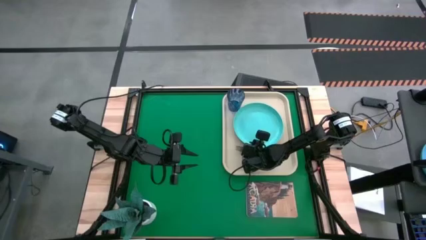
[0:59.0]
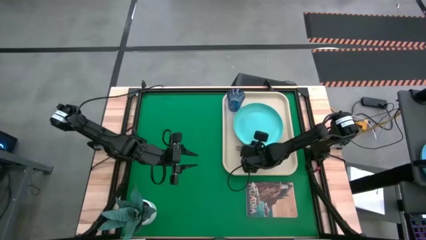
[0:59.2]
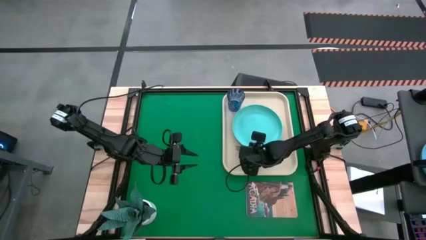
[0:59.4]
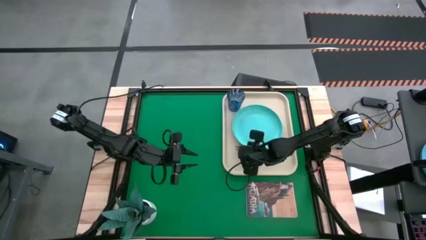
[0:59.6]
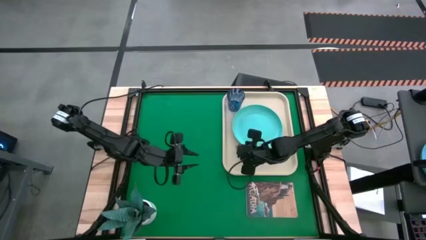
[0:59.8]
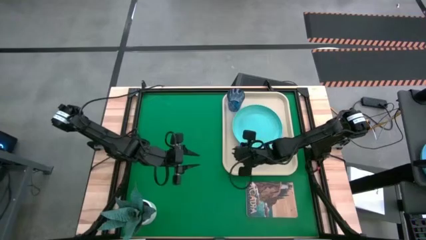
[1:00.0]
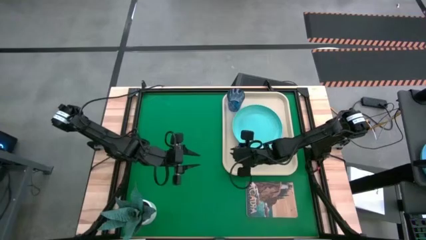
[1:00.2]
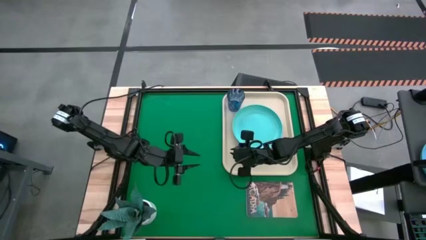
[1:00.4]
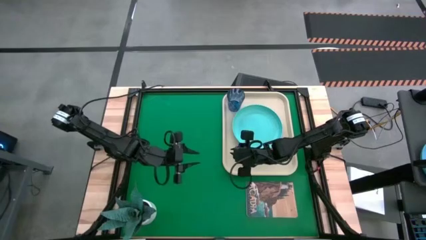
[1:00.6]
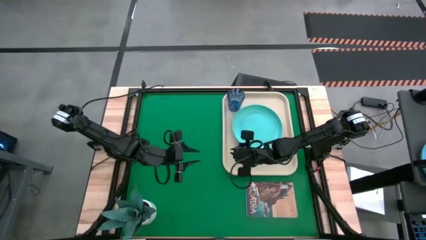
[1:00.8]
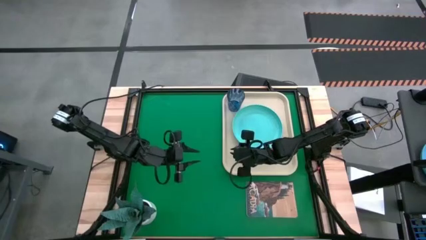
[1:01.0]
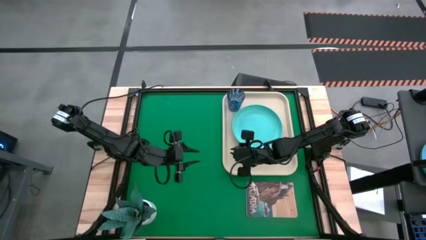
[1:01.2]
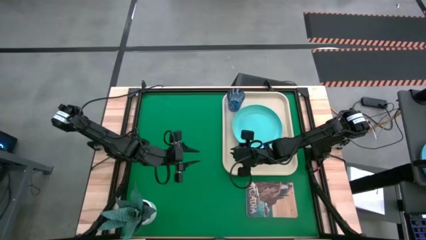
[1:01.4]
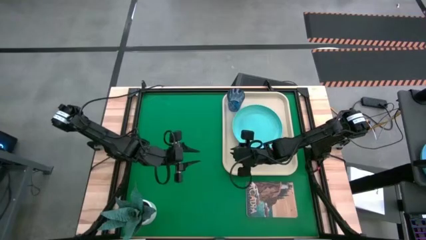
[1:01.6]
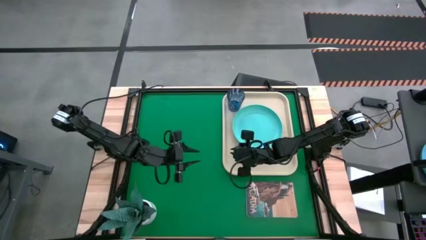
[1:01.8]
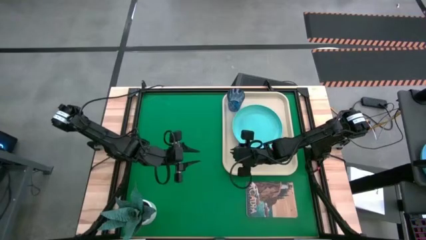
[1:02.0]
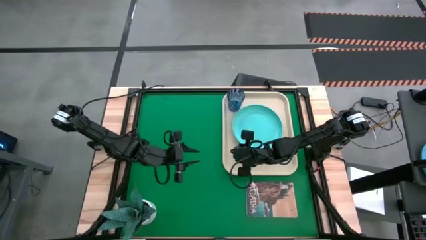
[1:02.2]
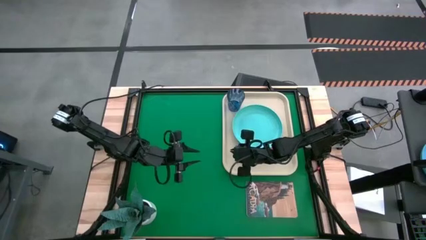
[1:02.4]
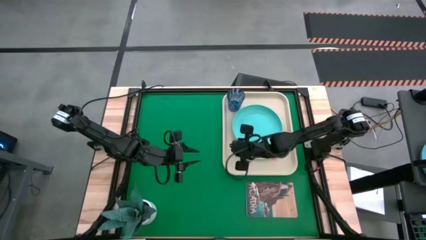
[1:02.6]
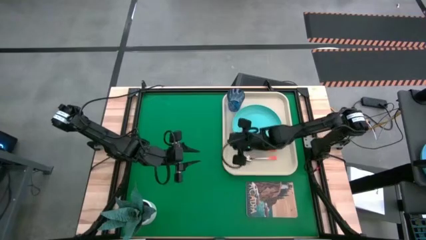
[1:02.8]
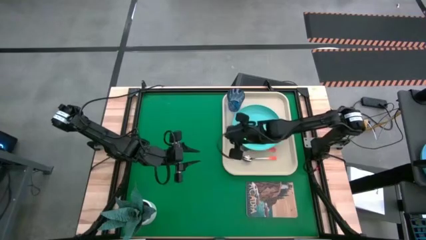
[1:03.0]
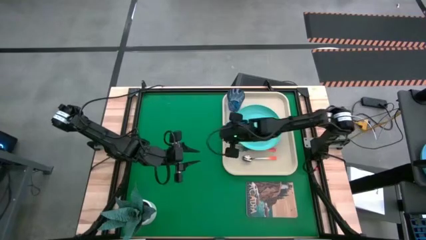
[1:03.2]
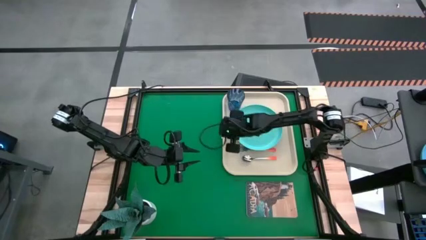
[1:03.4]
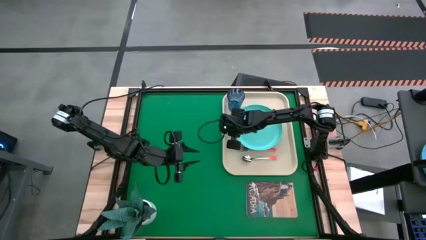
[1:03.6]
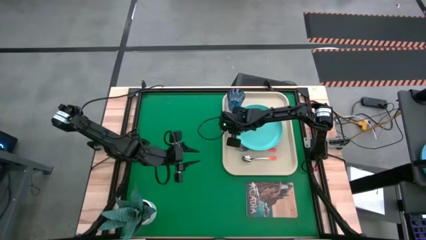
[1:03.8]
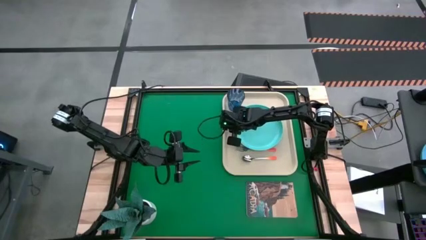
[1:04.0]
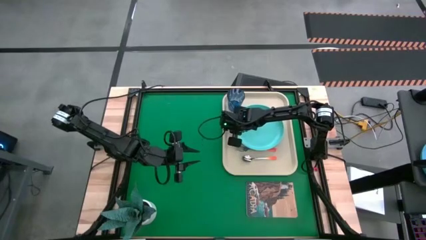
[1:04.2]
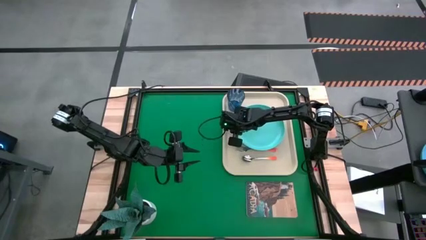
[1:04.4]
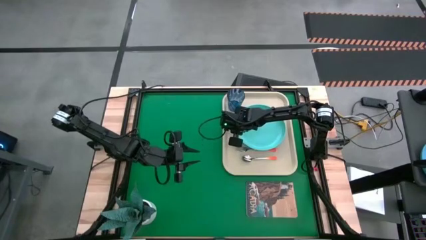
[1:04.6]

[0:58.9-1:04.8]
Task: Pick and place plate/cup/fork/spoon on tray
Adjust the blue plate on the table

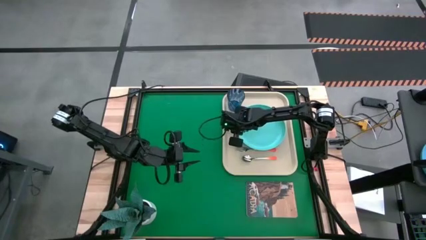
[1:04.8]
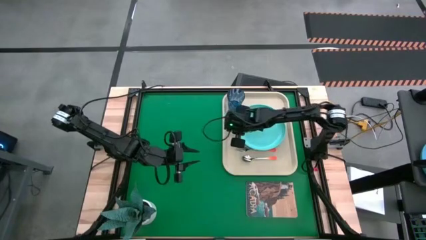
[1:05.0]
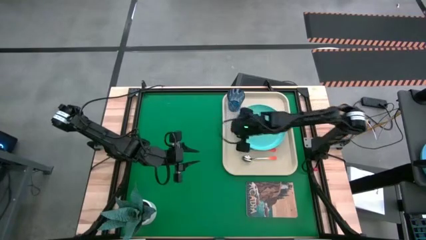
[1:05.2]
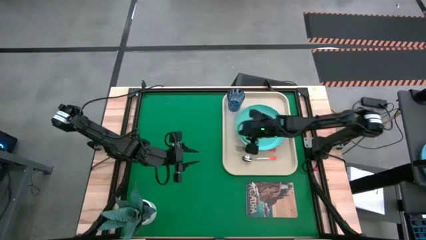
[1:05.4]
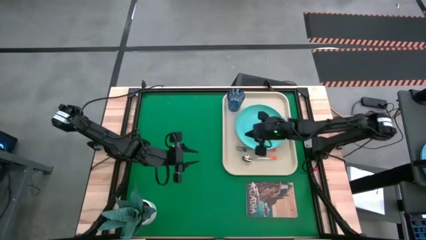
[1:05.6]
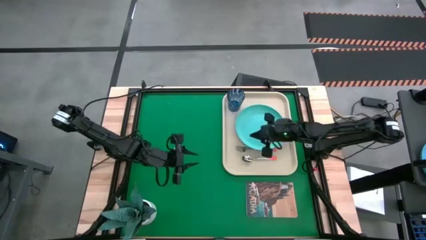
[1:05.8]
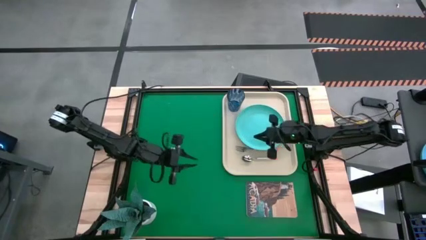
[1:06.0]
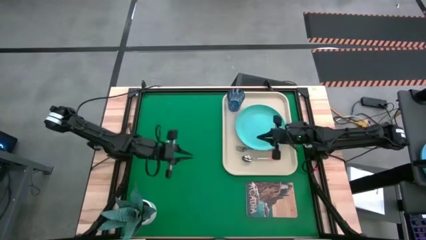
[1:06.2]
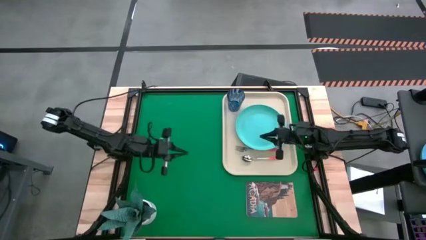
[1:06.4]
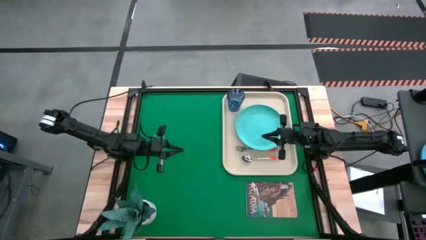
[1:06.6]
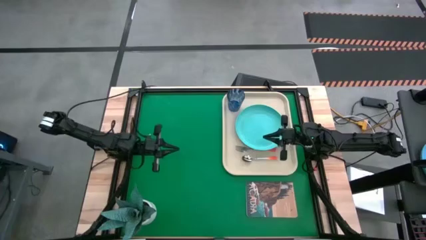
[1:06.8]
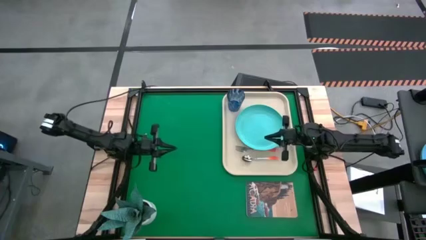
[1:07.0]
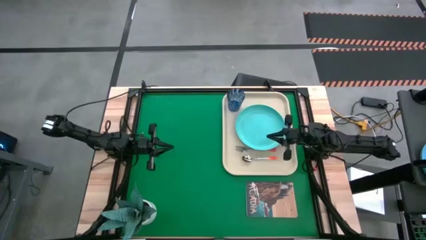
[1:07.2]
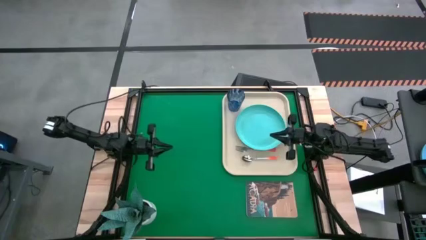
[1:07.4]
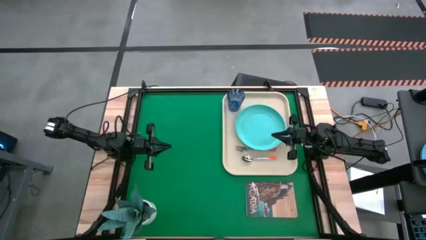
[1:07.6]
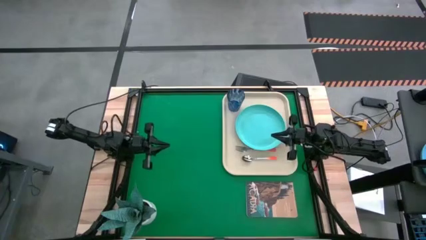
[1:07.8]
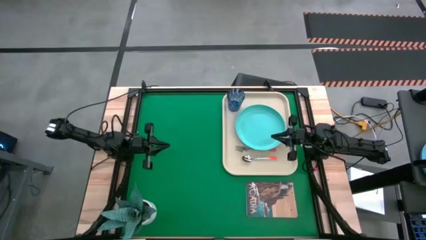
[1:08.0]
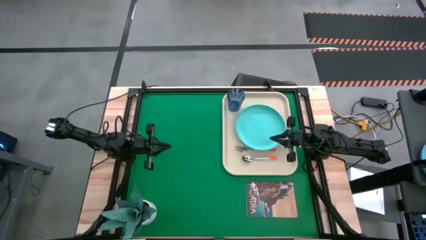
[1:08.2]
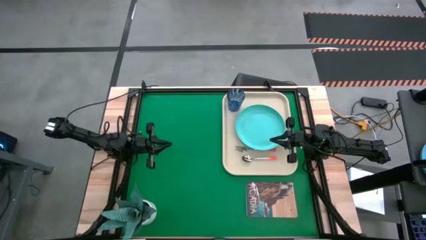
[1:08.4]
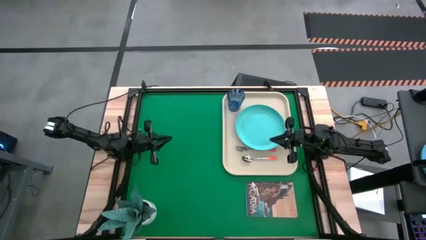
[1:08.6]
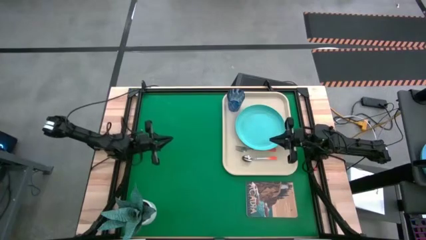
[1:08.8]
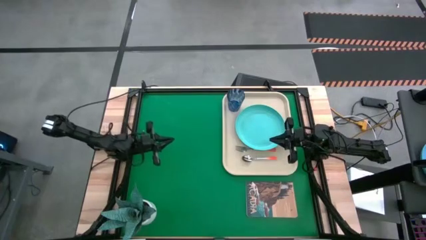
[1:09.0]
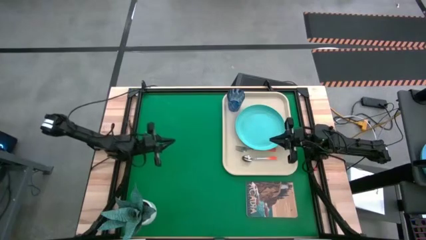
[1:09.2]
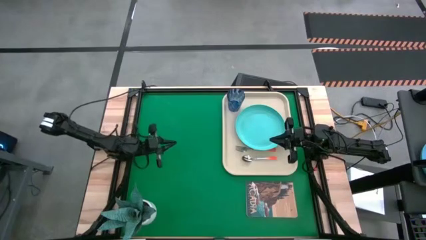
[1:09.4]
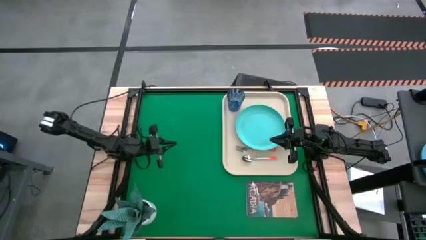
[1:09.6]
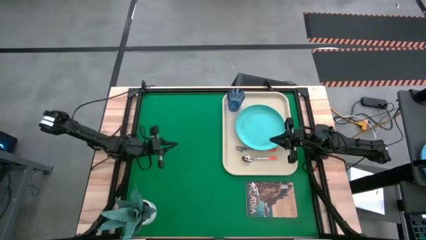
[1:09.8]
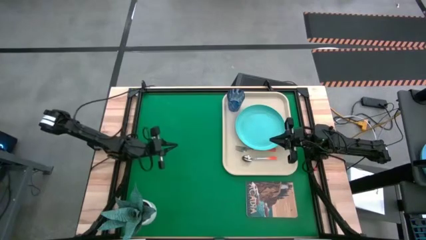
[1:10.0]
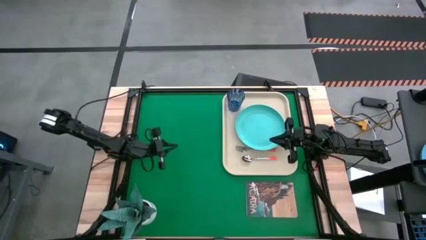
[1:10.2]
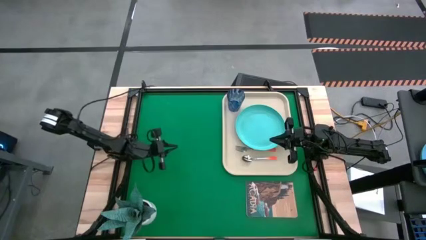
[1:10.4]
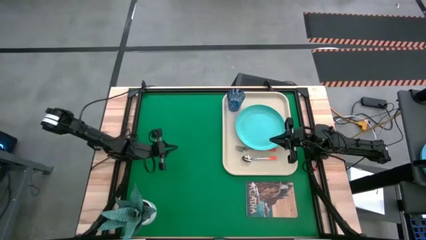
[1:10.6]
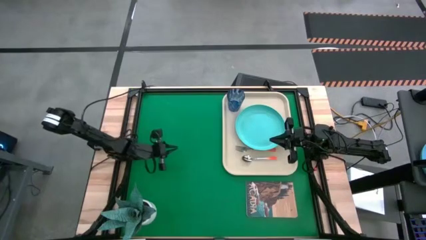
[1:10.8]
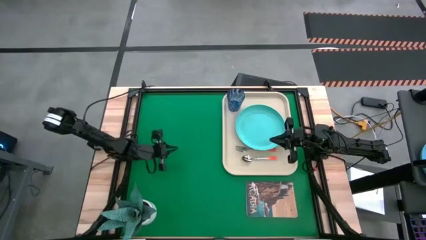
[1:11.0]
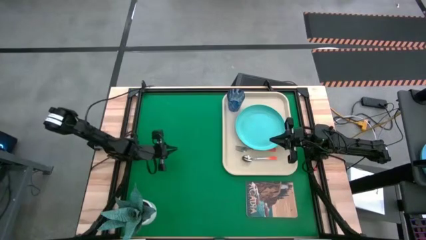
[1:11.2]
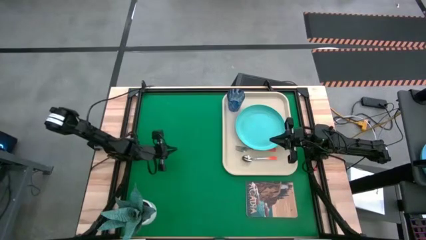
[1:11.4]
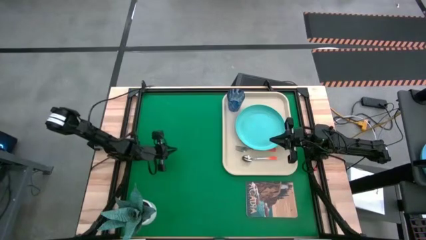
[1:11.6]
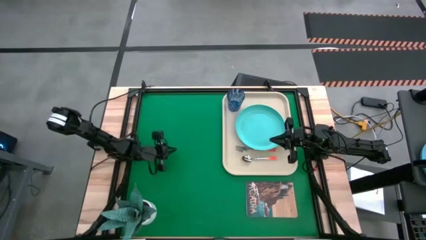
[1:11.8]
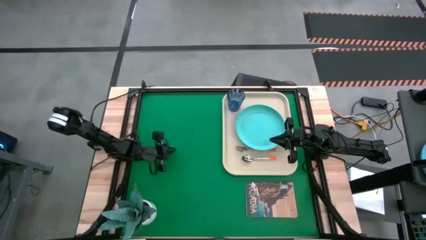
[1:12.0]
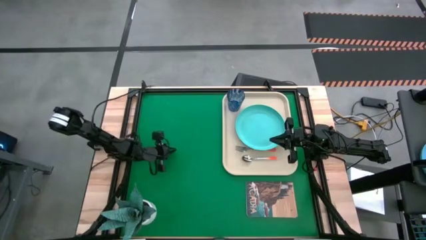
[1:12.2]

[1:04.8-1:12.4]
Return to Home Position
